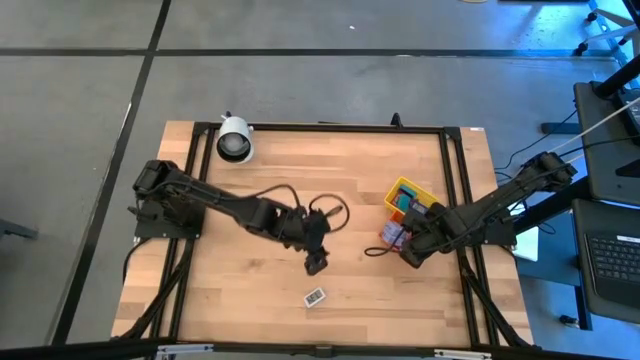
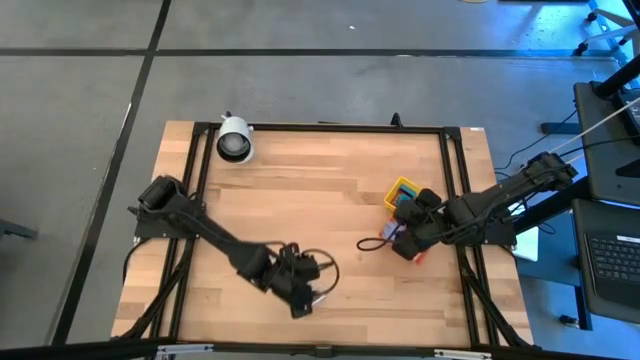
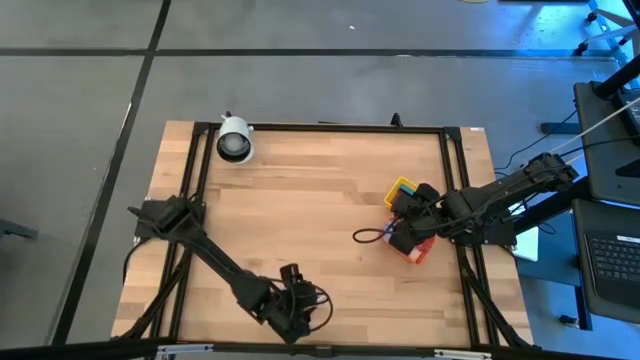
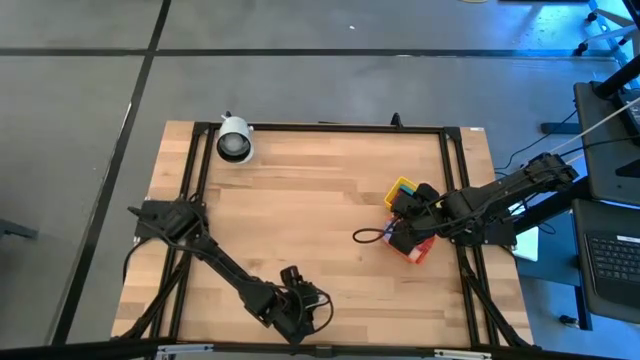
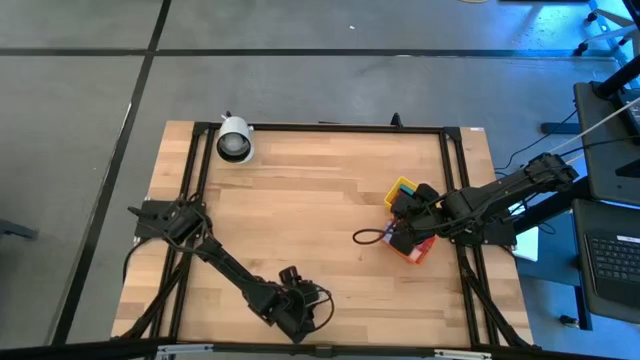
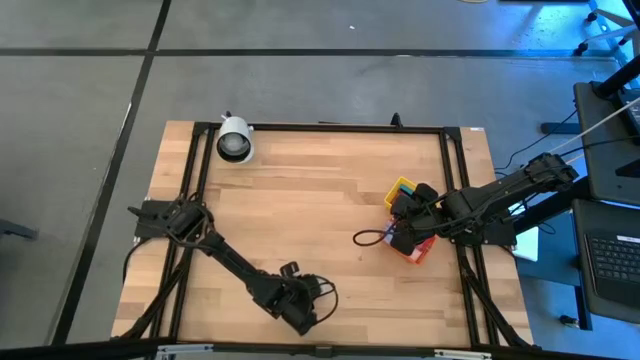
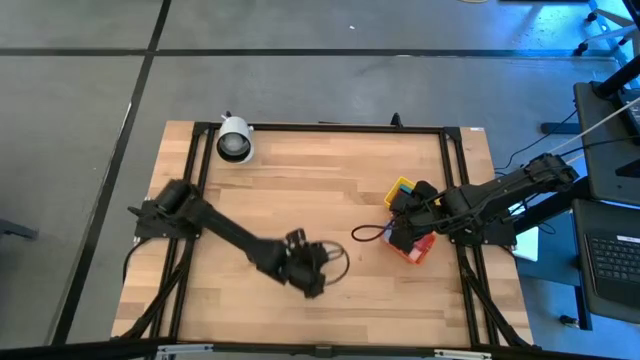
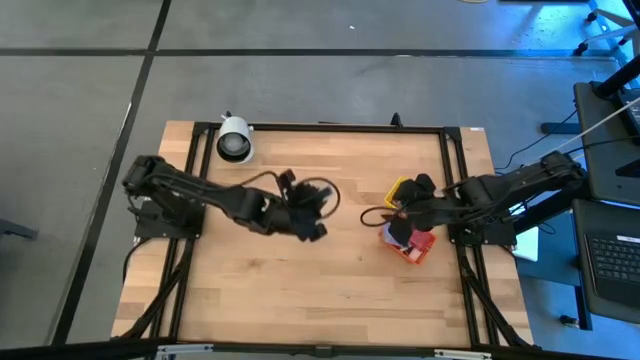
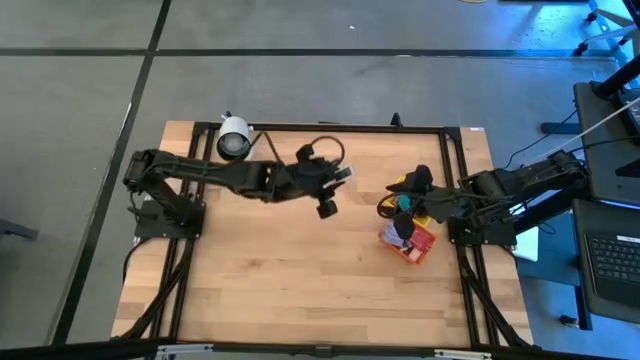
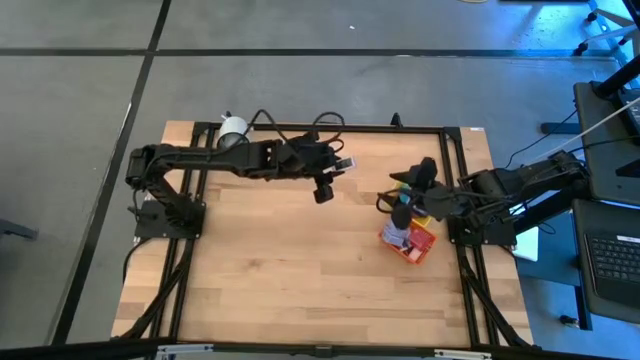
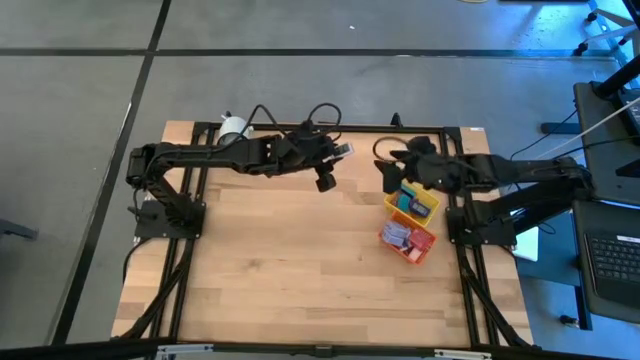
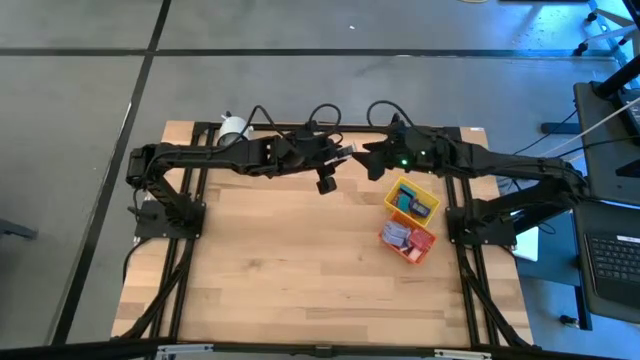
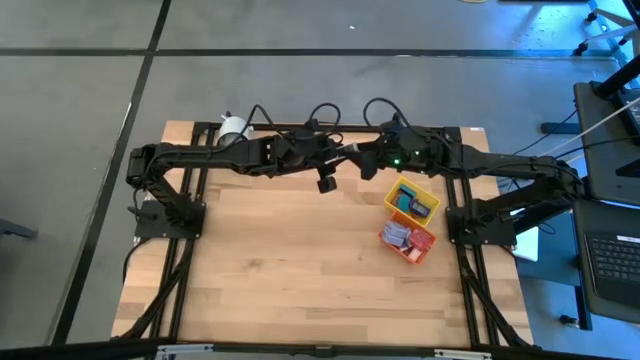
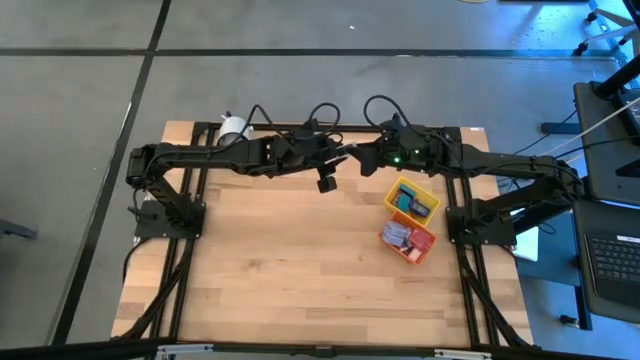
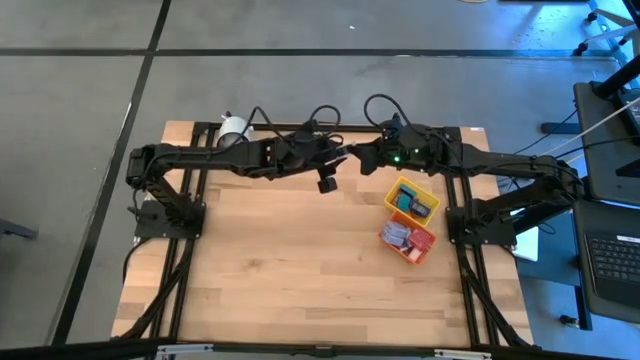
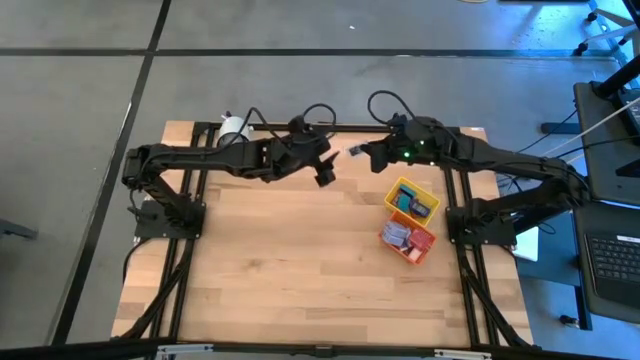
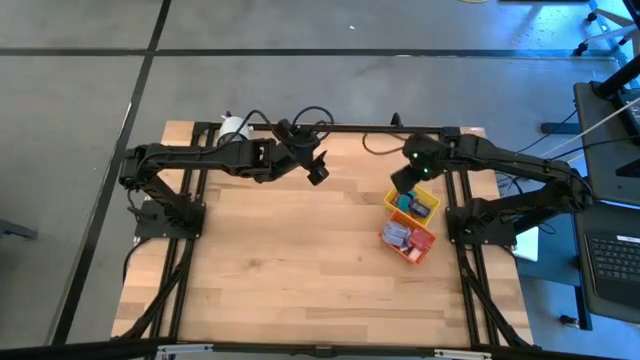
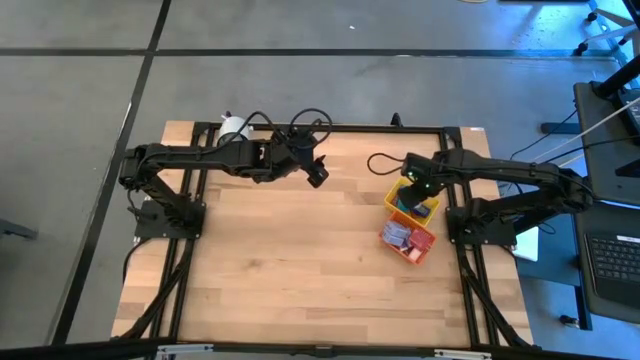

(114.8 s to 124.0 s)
Task: Pick & Place Office items
Put the white digital timer into the yellow basket

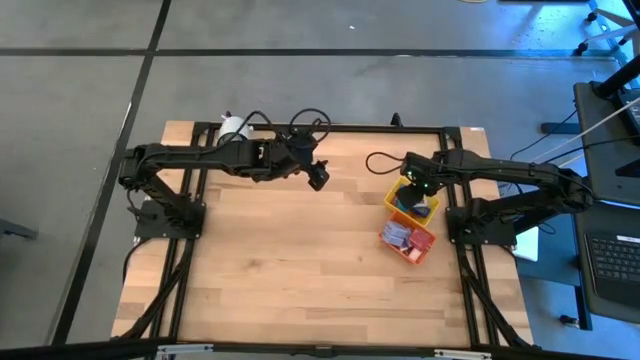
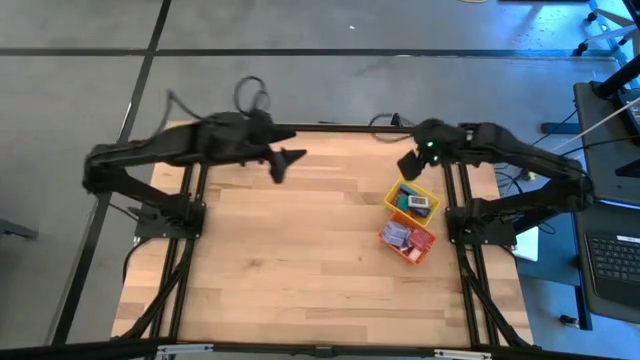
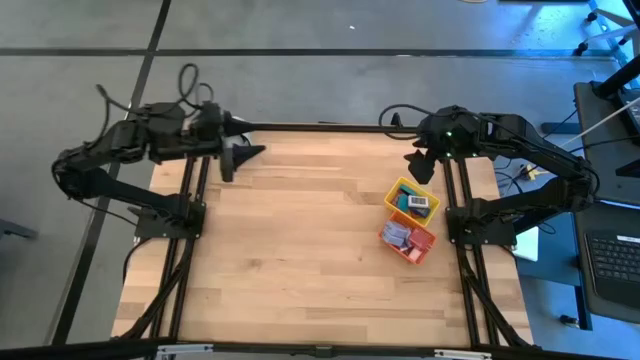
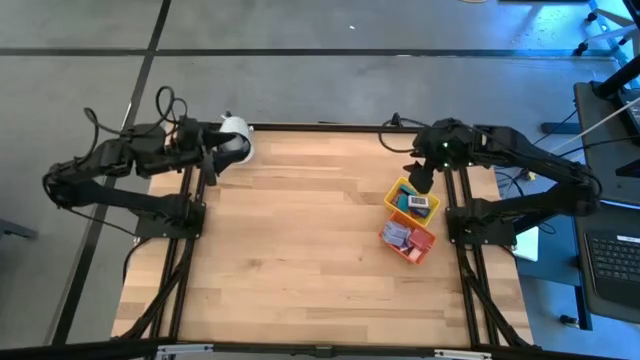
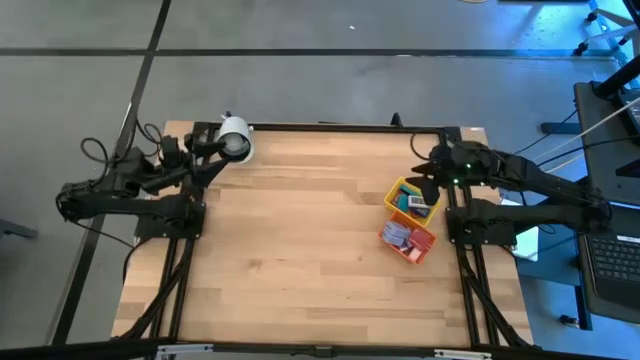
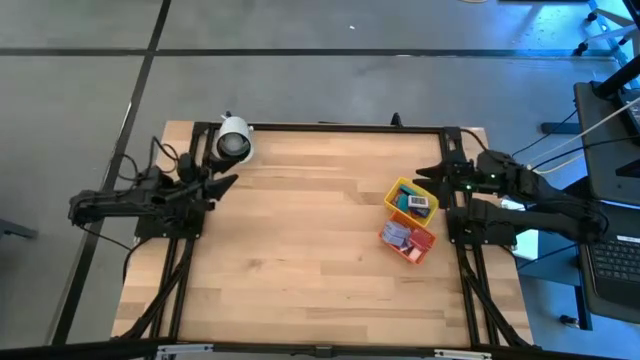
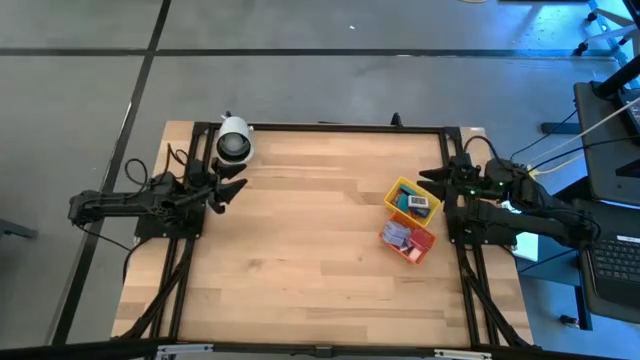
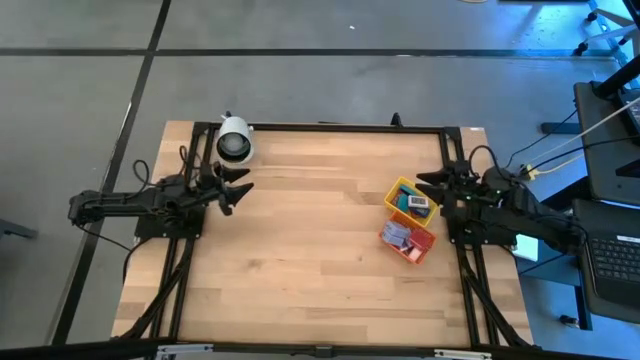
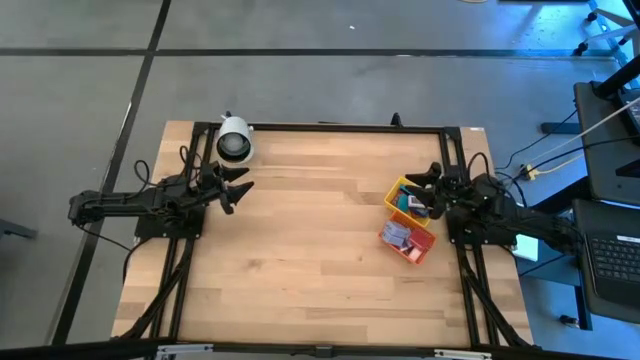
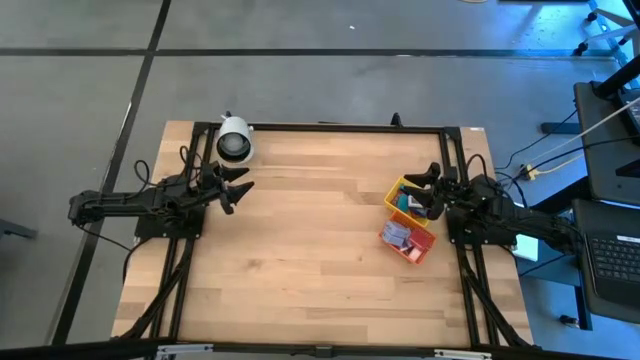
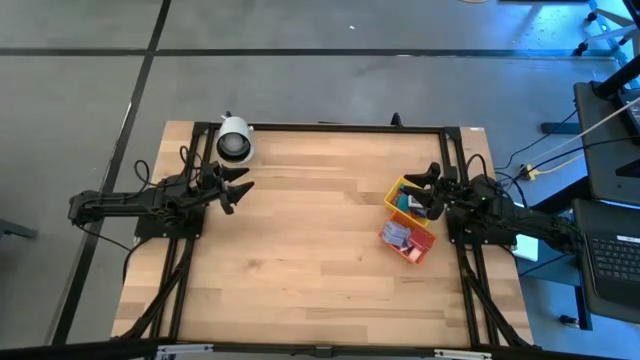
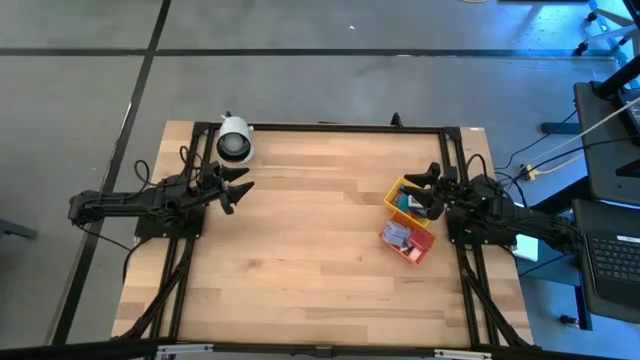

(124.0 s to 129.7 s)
Return to Home Position

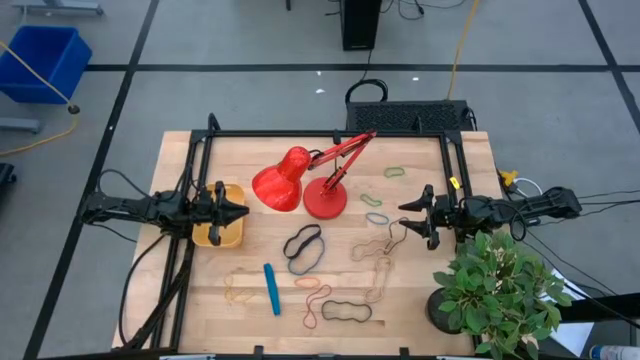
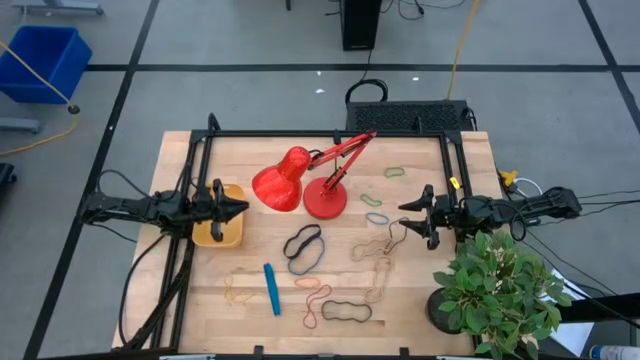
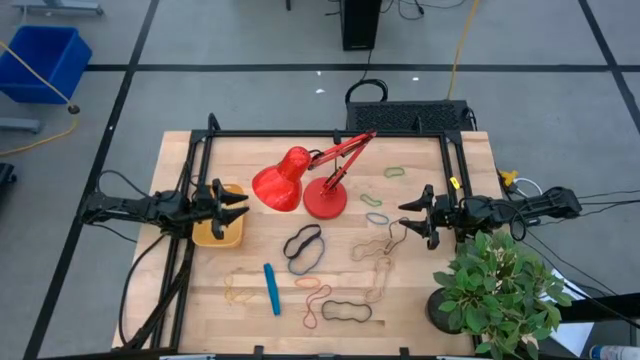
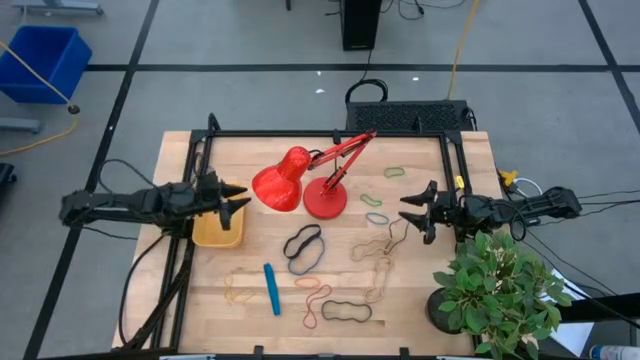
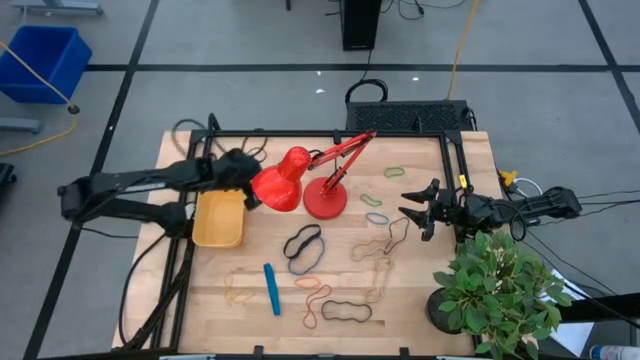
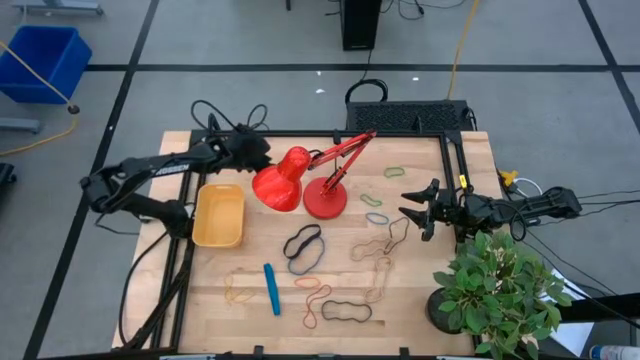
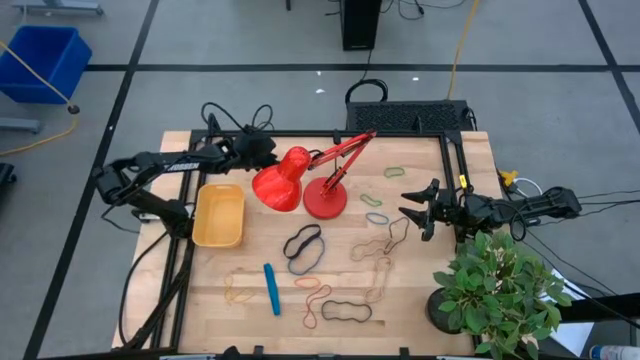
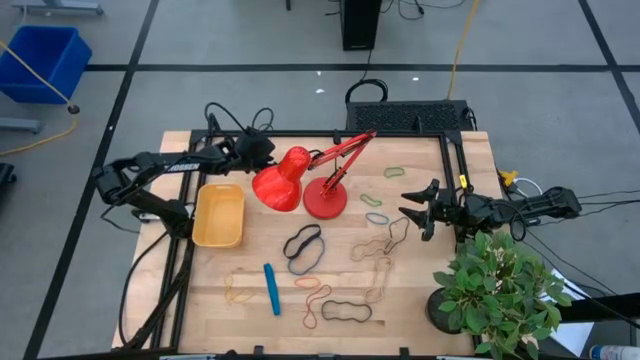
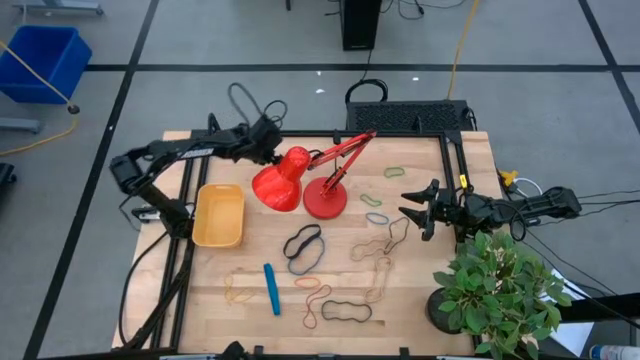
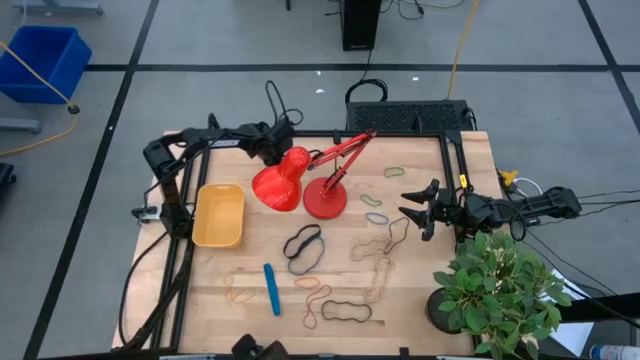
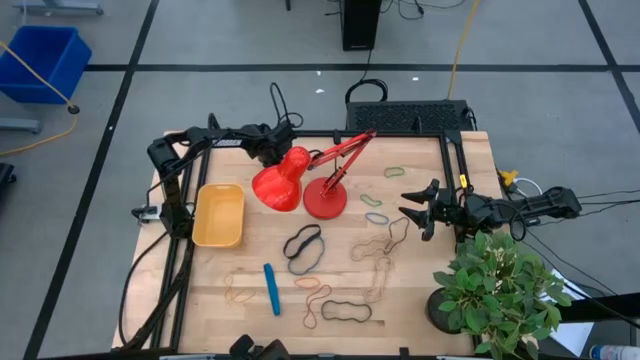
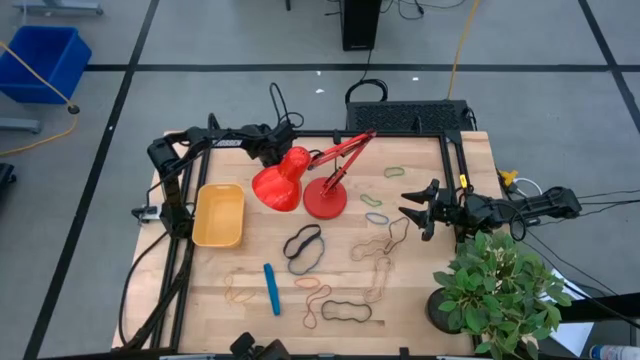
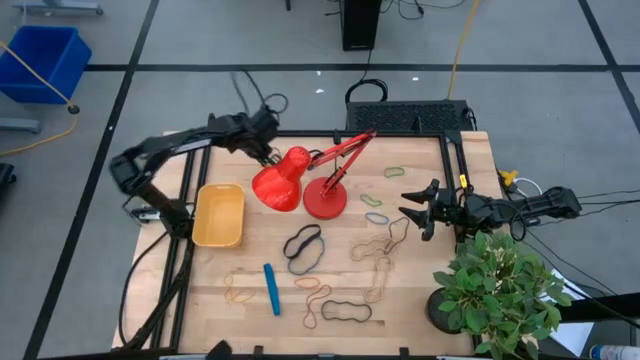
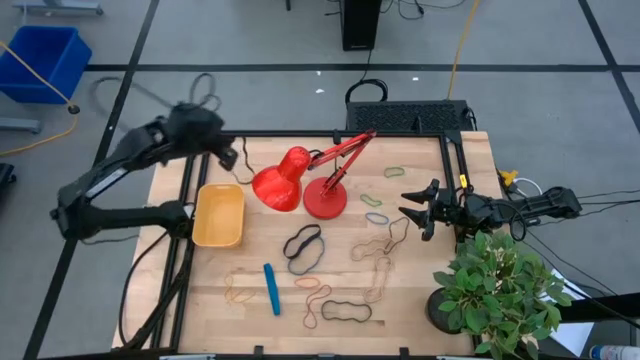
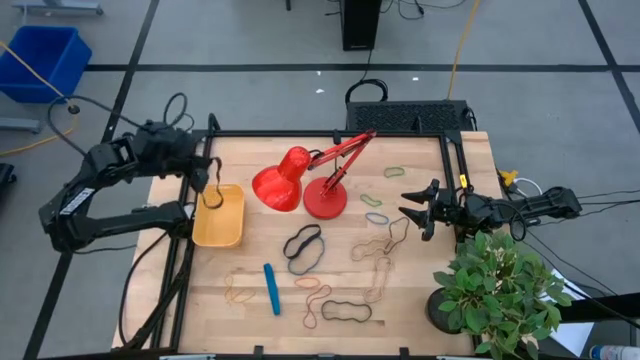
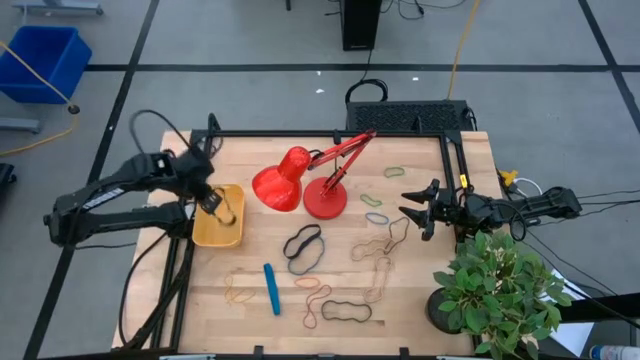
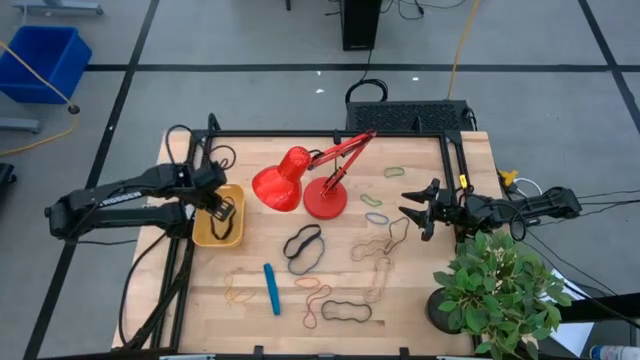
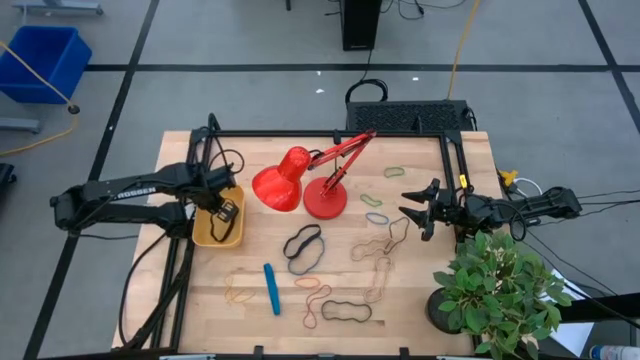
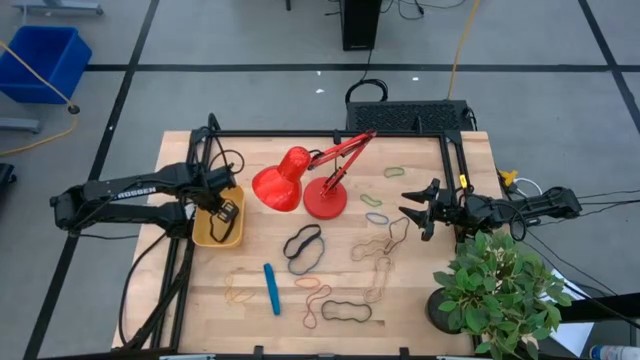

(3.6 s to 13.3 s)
Task: Pick and place rubber bands into bin
Put the top black rubber band into the yellow bin
